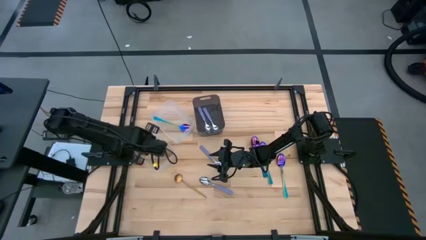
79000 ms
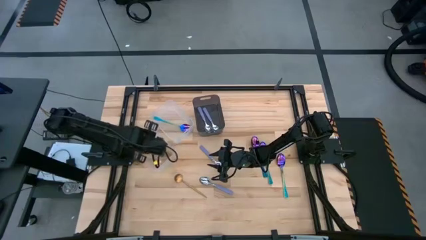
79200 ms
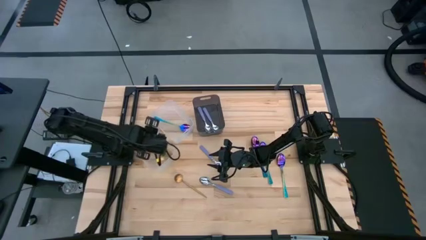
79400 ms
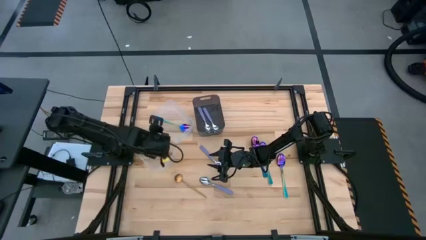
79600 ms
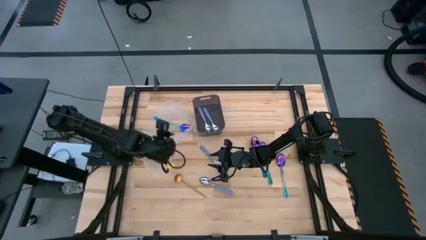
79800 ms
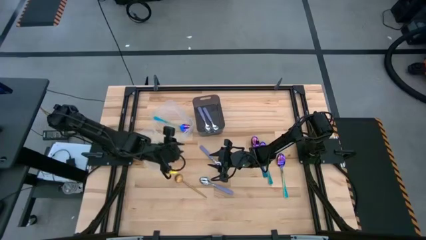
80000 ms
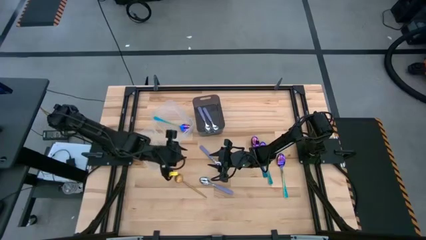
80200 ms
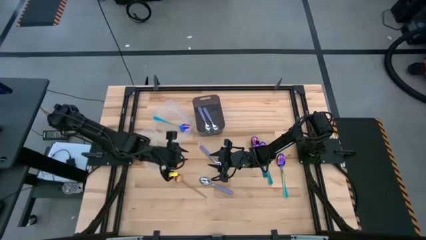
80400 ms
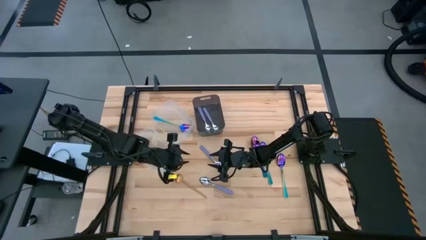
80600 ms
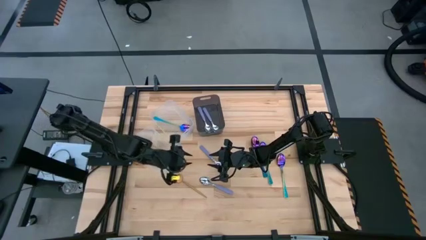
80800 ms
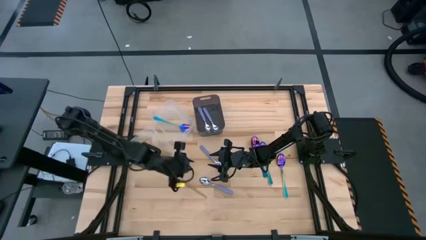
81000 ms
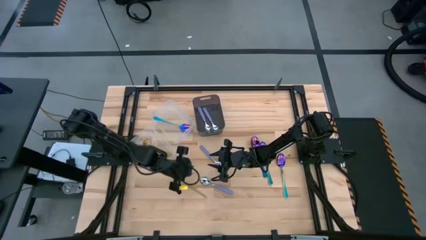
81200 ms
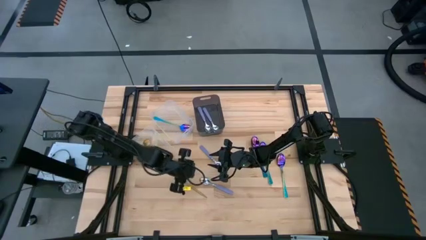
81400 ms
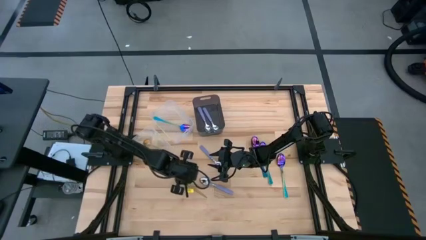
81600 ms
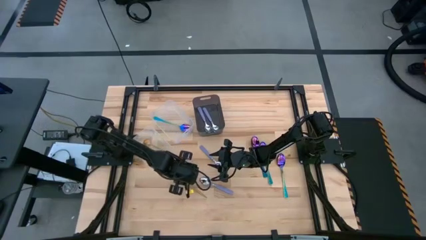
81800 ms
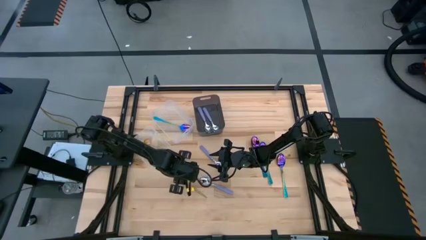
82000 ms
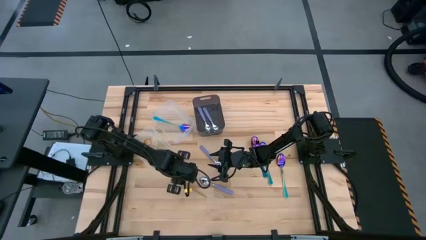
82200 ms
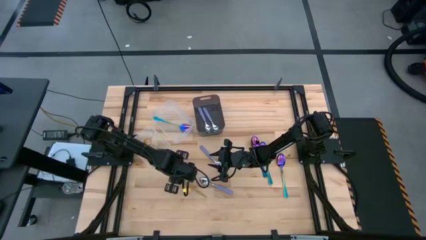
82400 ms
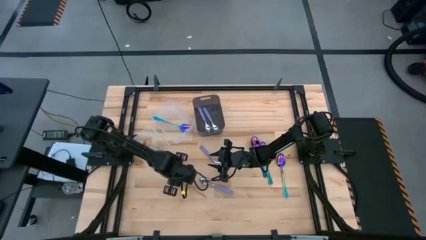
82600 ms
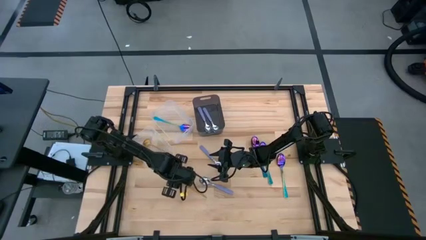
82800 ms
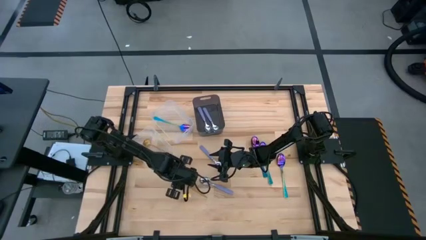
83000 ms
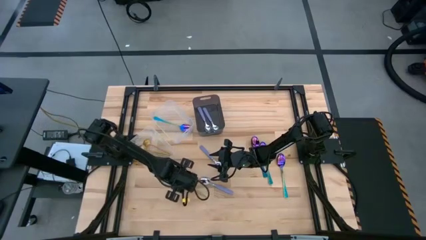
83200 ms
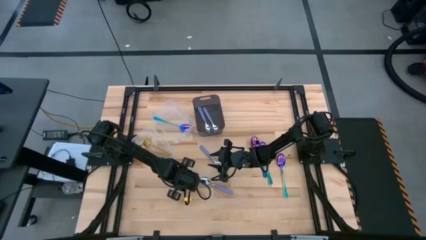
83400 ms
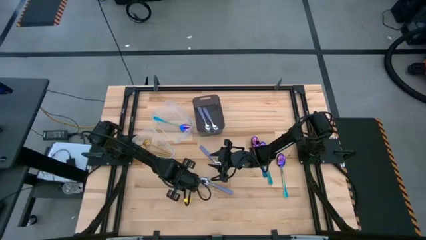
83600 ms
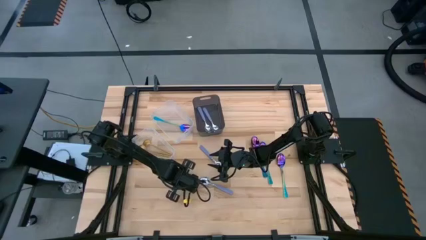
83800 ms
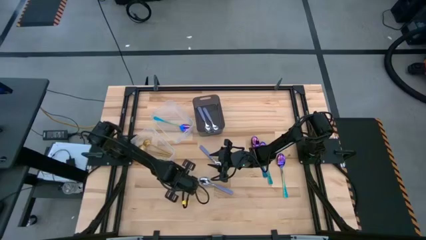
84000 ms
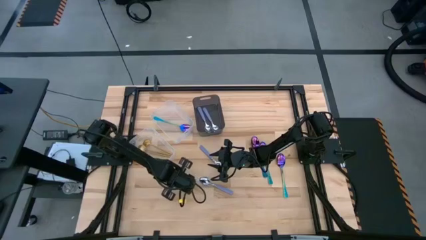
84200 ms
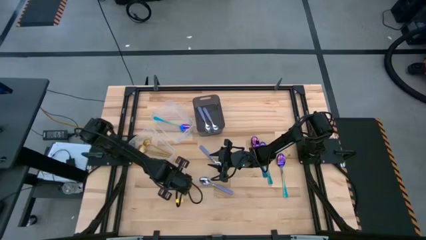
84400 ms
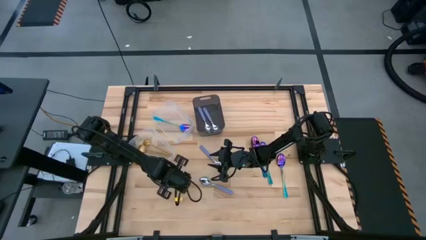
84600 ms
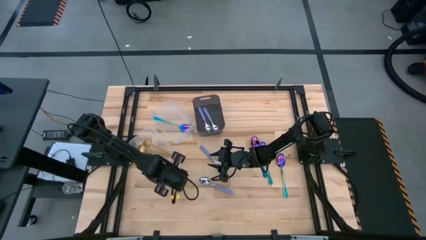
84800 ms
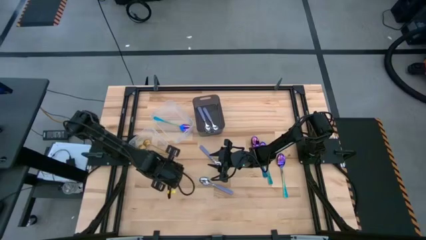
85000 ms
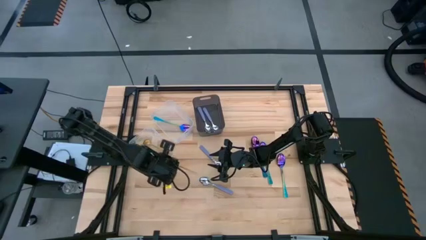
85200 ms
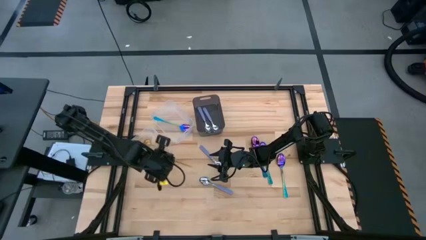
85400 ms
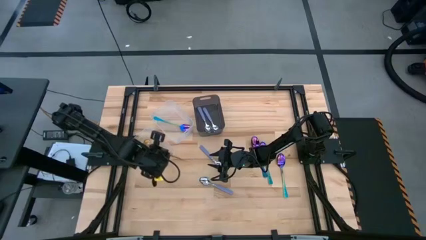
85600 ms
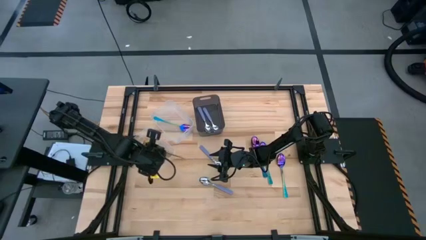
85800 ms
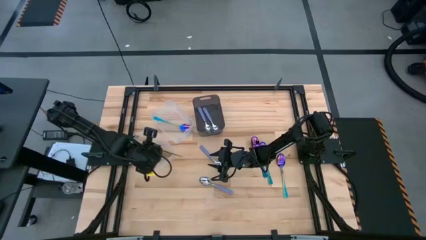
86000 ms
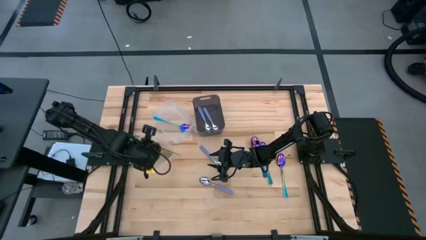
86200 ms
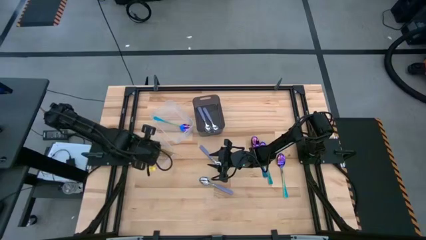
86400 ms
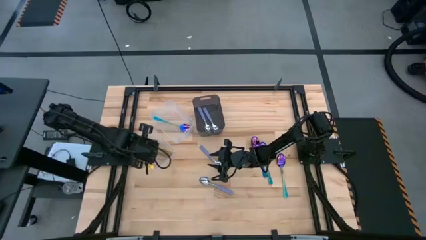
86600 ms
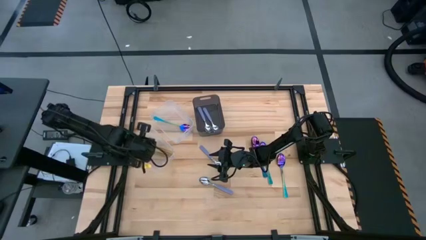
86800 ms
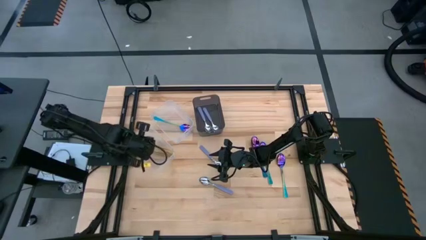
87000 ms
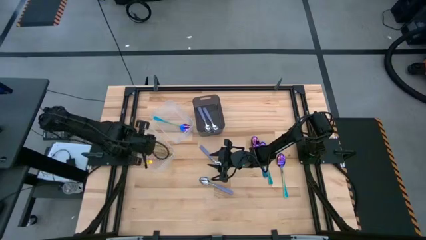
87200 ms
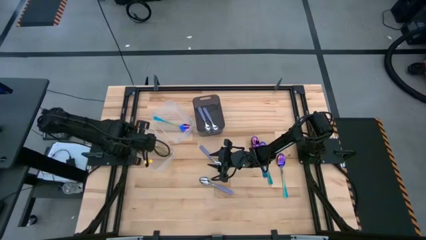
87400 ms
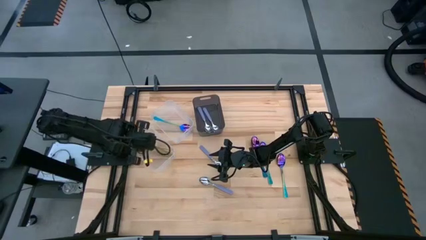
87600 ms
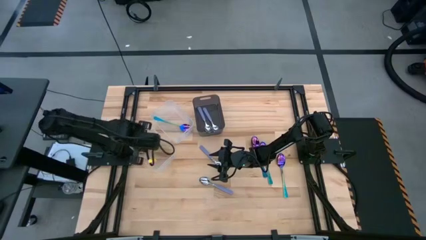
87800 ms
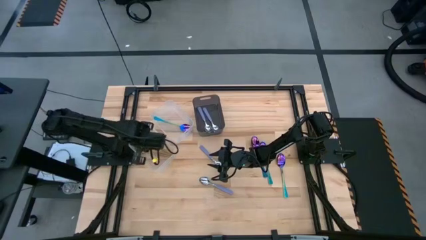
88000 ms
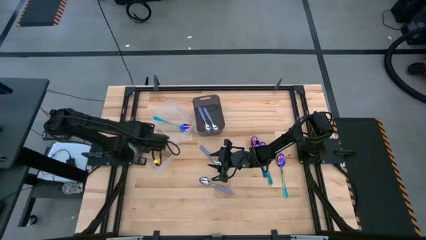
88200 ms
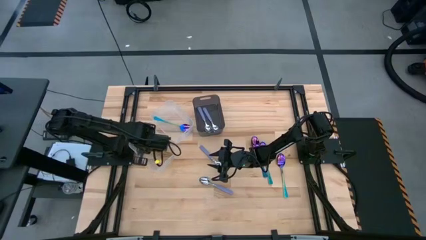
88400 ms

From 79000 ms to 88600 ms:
Task: Sort silverware by color (type)
Put the gold spoon into the bottom transparent bin

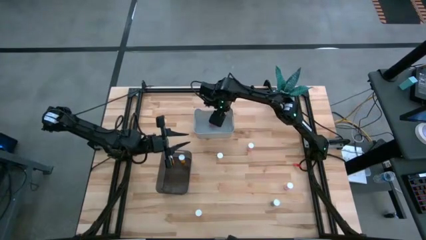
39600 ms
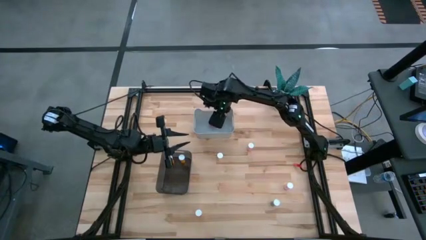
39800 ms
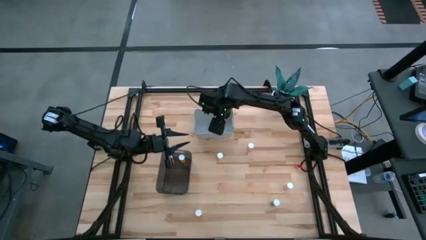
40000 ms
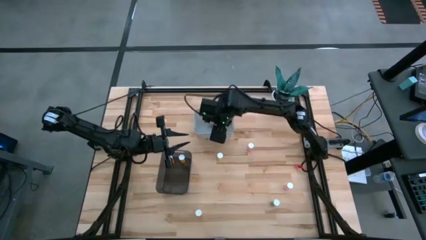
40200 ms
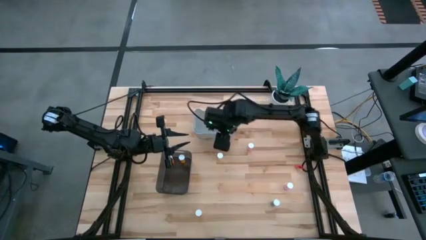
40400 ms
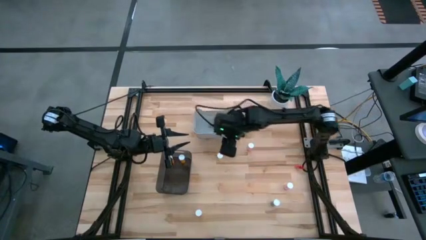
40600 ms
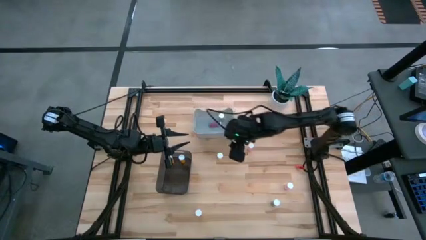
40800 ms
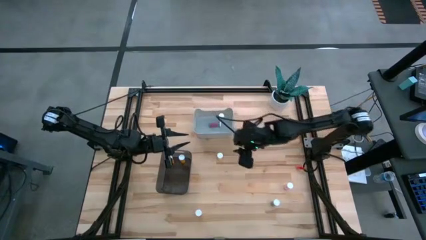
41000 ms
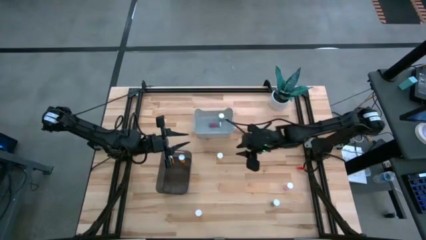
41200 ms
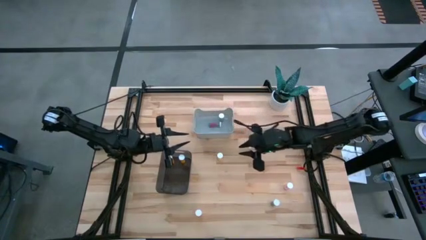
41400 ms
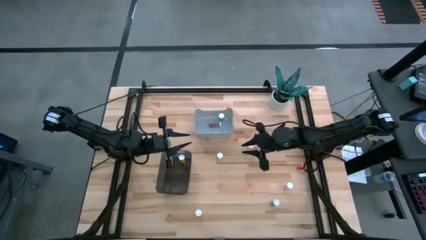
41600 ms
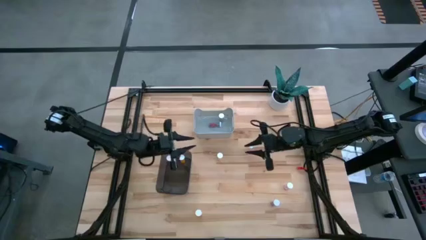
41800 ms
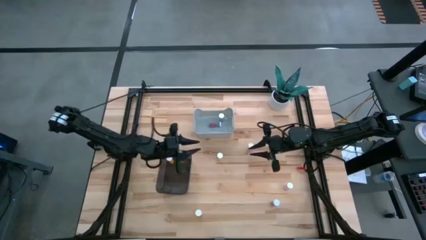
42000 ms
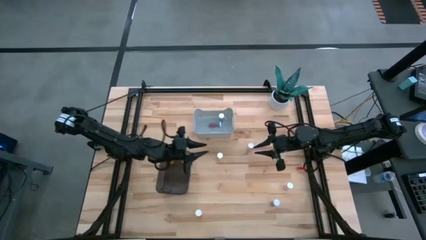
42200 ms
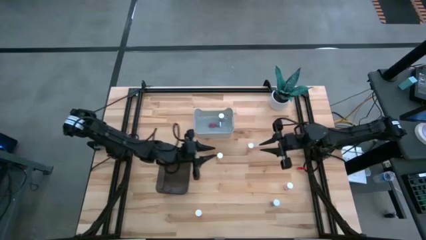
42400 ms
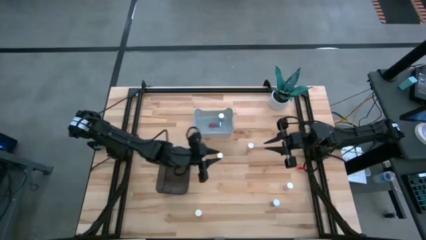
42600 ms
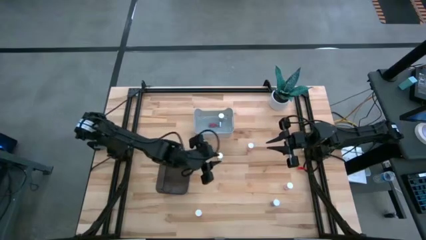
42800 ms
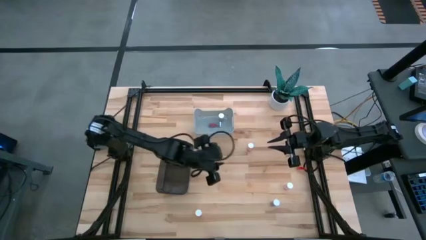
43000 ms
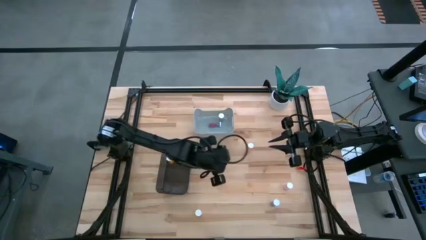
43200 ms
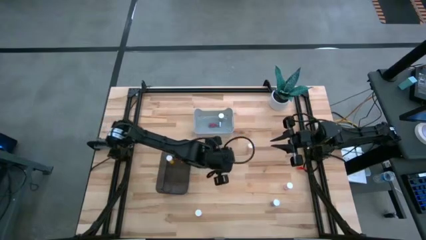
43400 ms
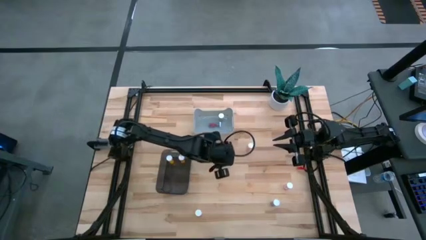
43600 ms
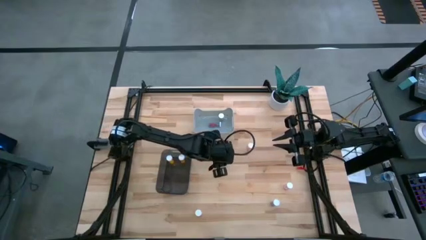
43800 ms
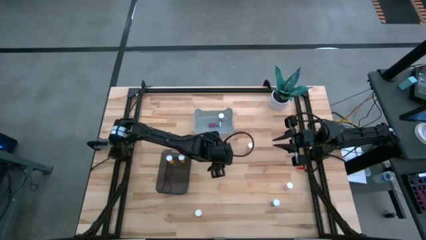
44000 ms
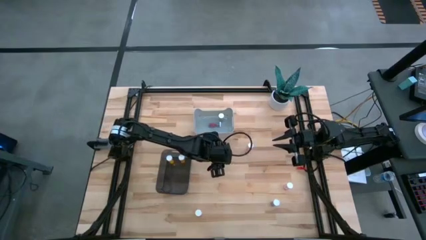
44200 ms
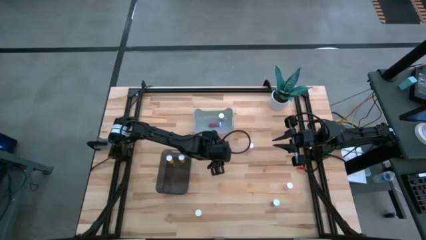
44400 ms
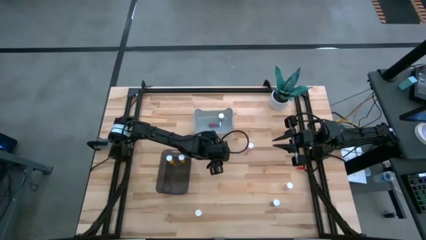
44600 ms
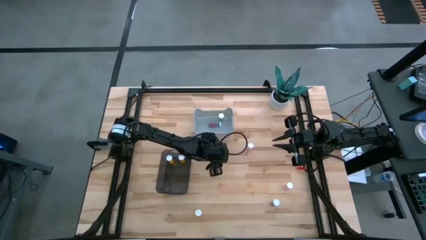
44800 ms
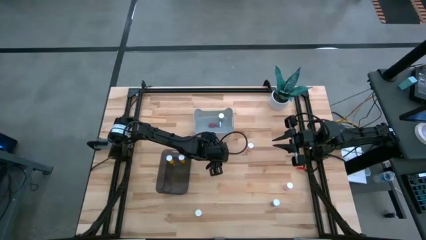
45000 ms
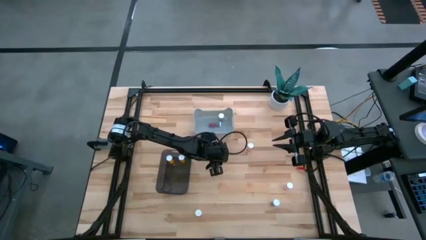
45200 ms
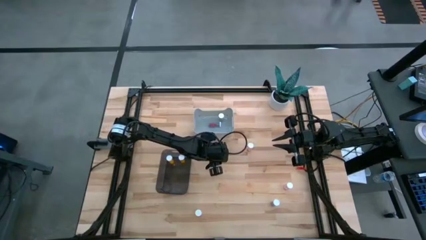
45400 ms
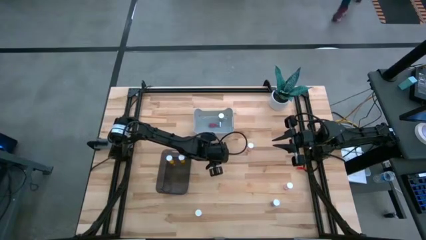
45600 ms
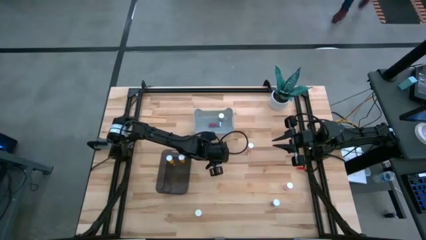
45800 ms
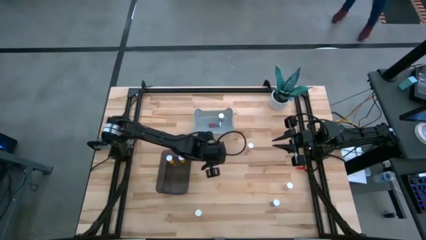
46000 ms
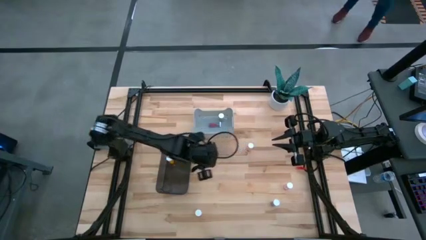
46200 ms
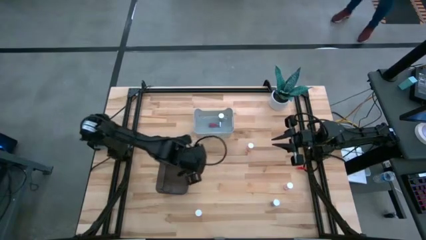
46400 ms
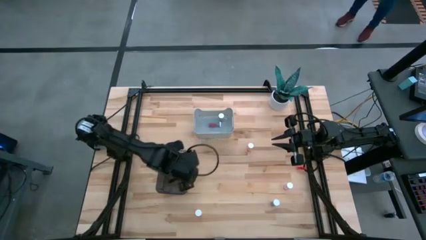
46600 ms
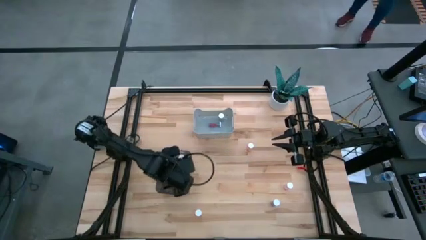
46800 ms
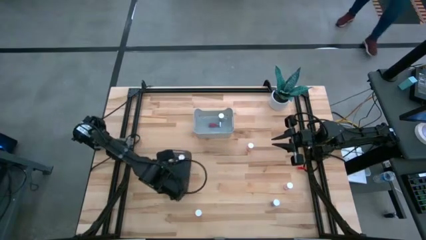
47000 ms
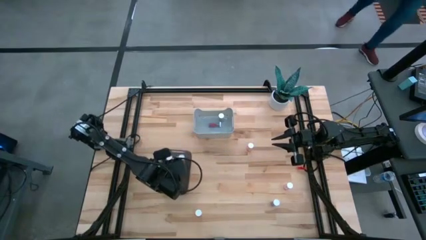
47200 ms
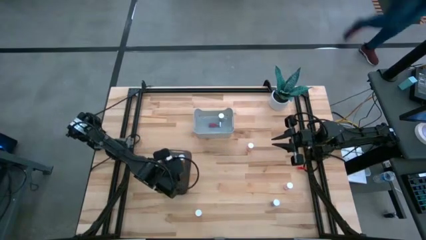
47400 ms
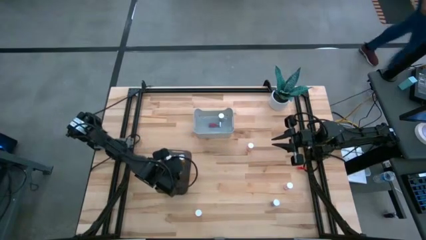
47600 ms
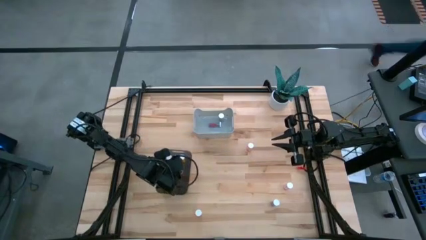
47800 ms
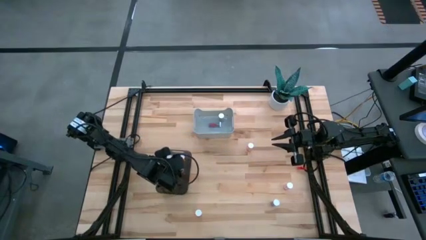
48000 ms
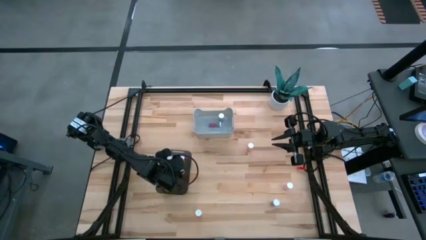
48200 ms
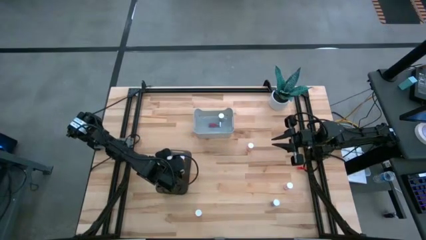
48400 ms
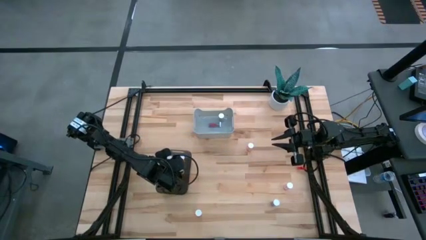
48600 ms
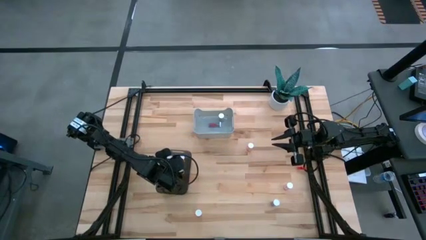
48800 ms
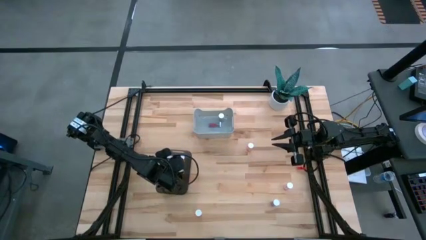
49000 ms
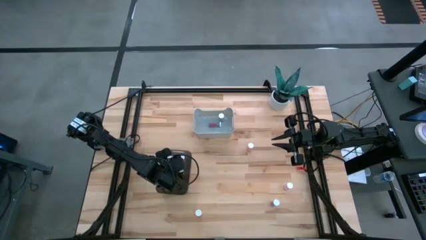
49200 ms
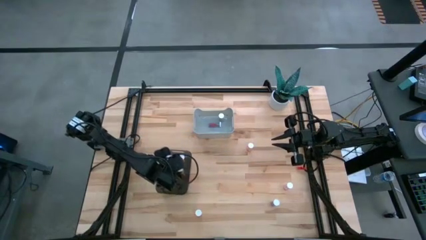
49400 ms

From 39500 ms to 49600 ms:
Task: Pick and place medicine bottles into bin by pill shape (circle, oval)
Put the yellow tablet bottle into the black bin
